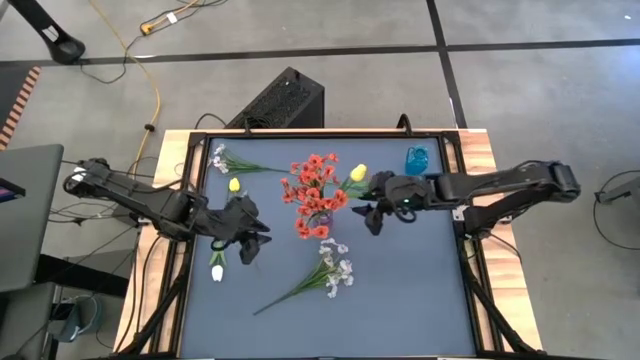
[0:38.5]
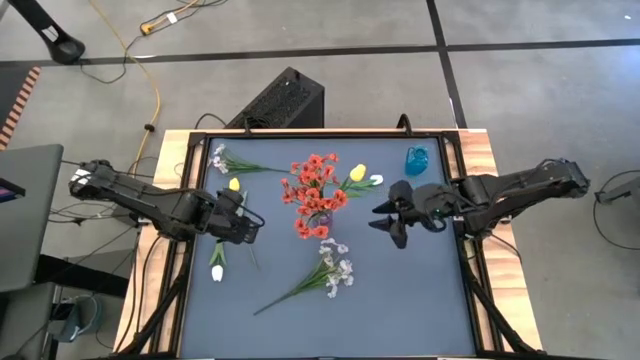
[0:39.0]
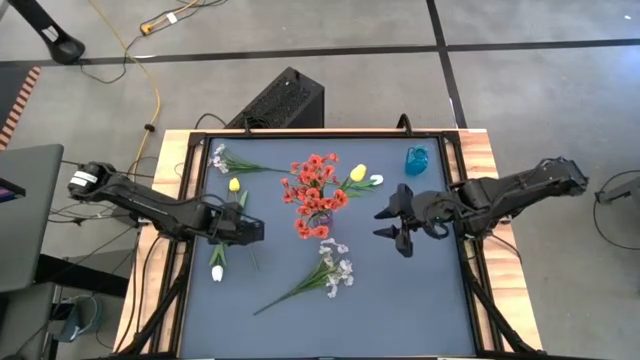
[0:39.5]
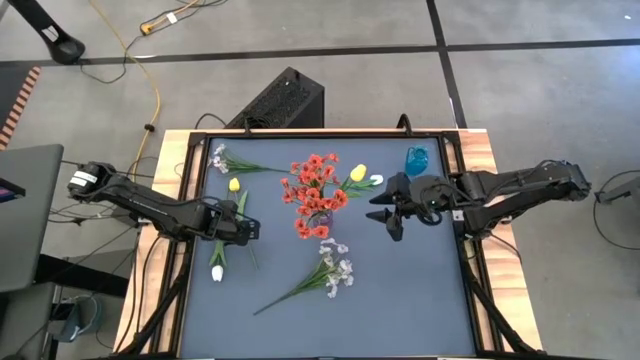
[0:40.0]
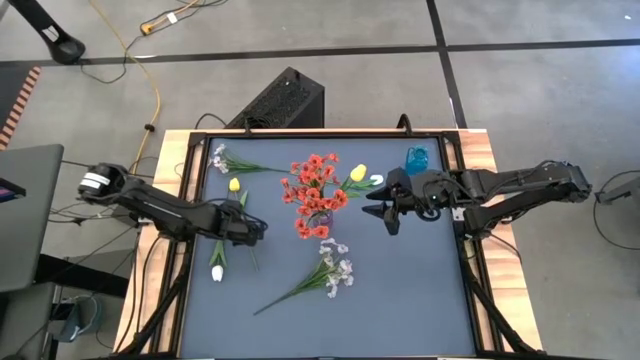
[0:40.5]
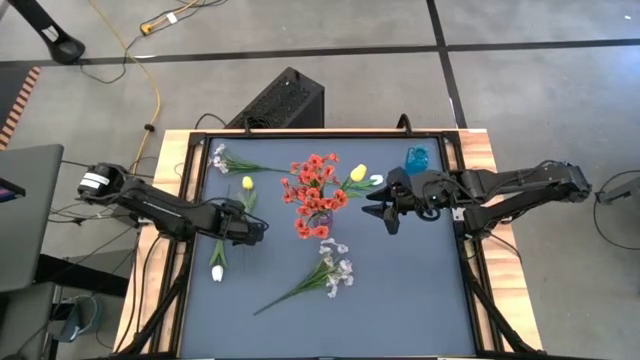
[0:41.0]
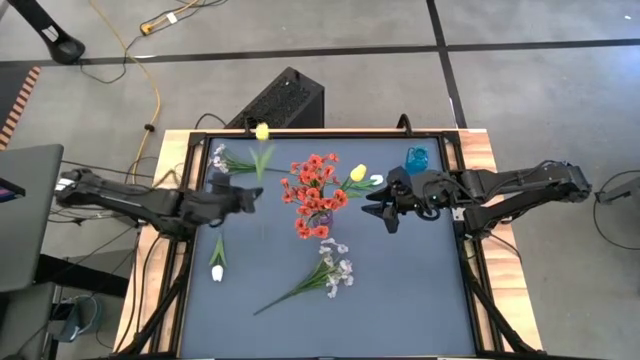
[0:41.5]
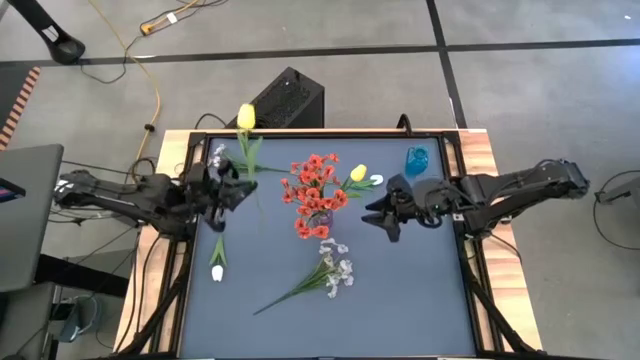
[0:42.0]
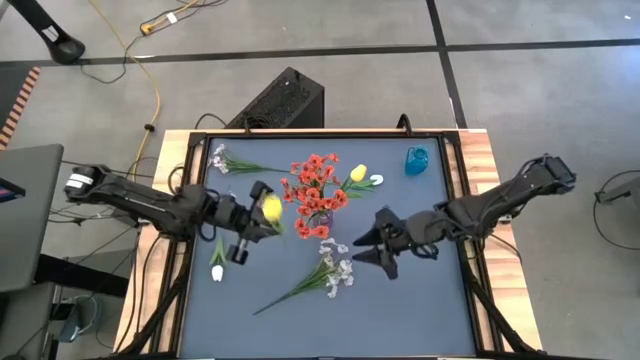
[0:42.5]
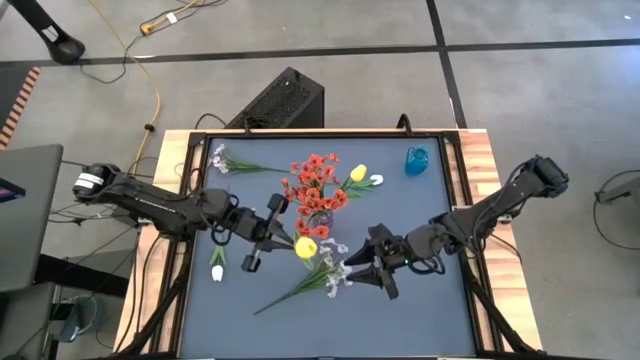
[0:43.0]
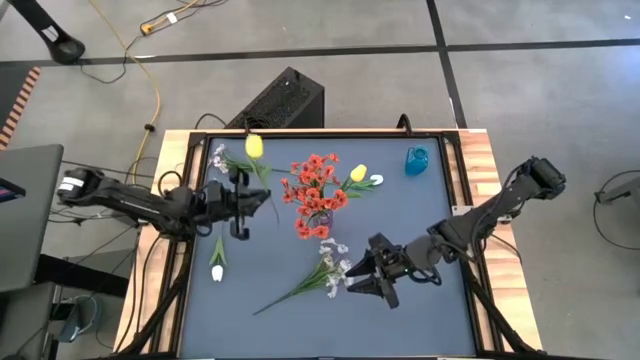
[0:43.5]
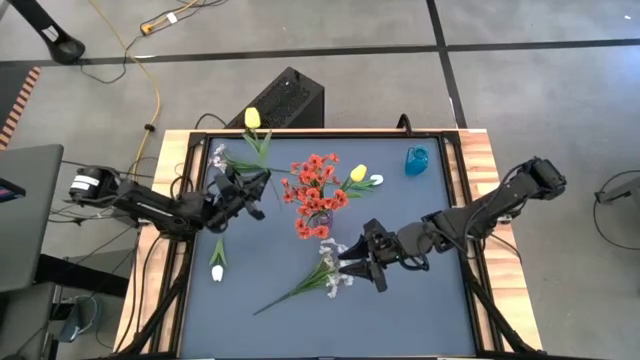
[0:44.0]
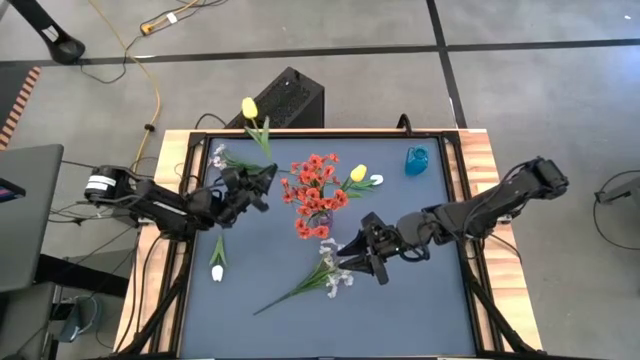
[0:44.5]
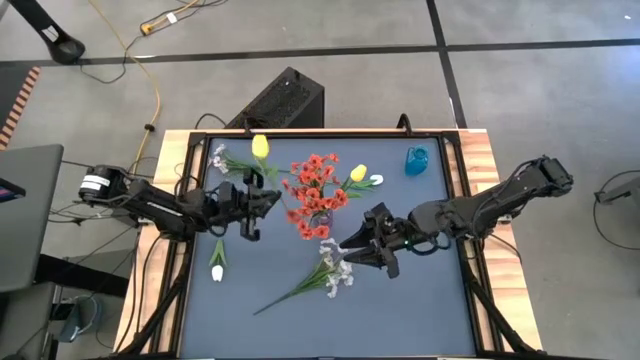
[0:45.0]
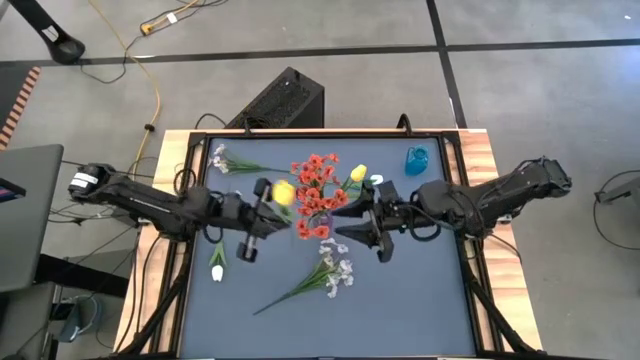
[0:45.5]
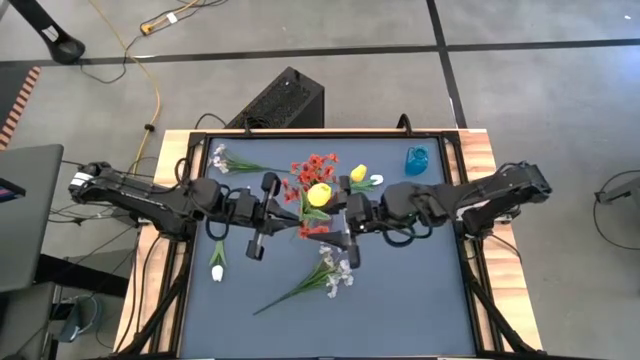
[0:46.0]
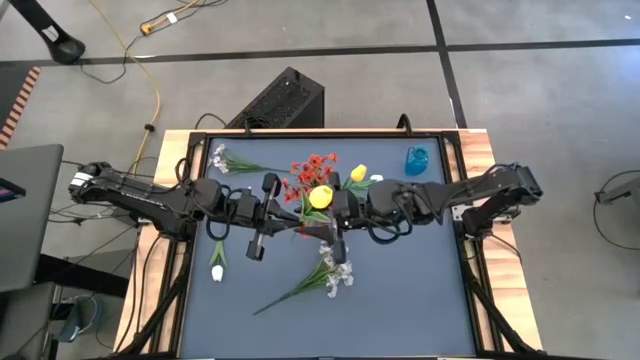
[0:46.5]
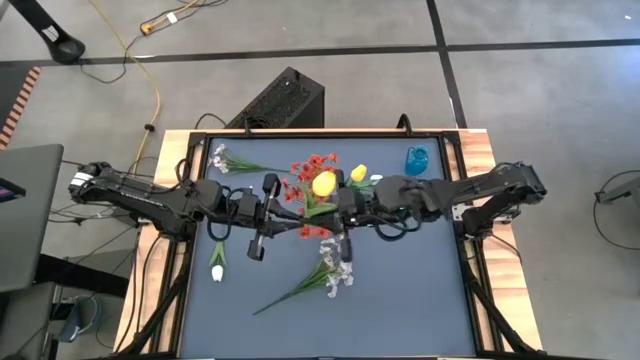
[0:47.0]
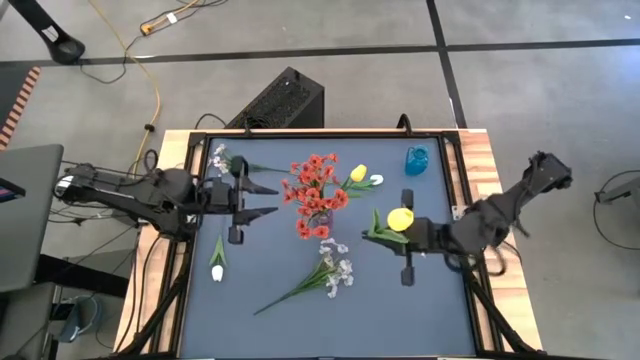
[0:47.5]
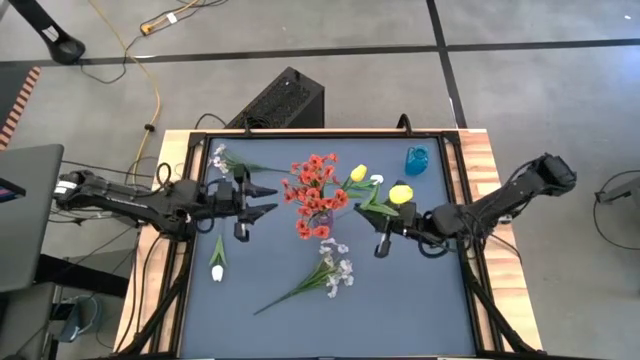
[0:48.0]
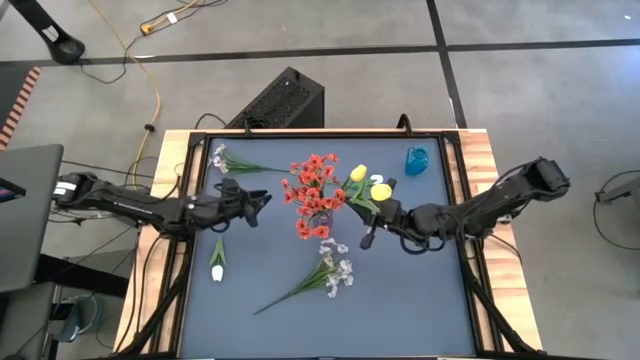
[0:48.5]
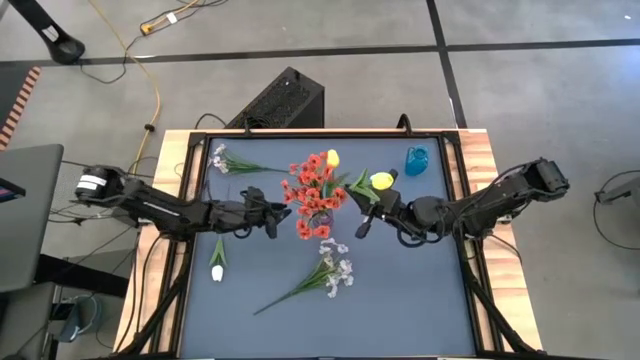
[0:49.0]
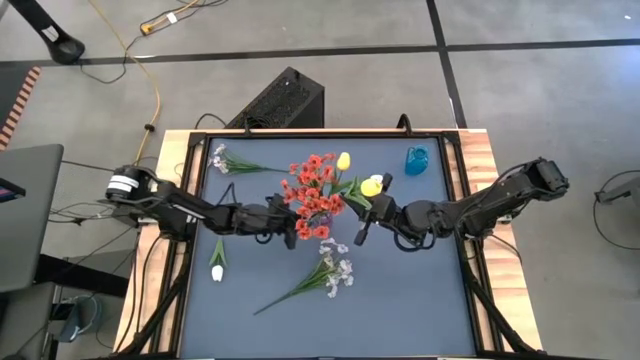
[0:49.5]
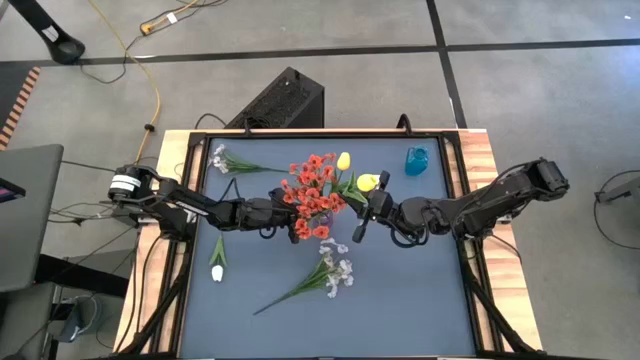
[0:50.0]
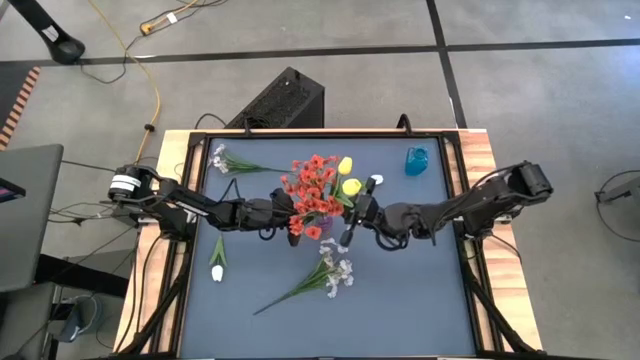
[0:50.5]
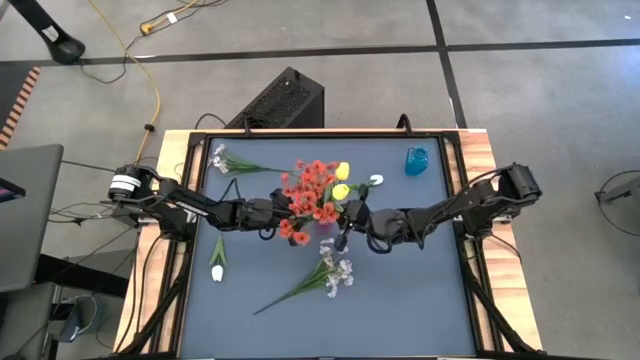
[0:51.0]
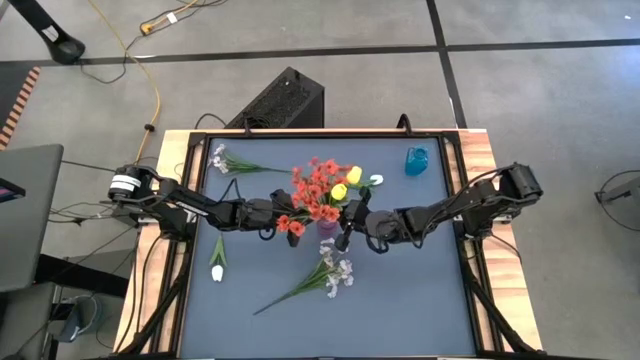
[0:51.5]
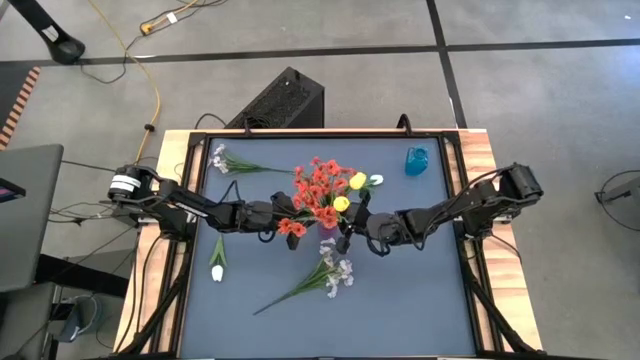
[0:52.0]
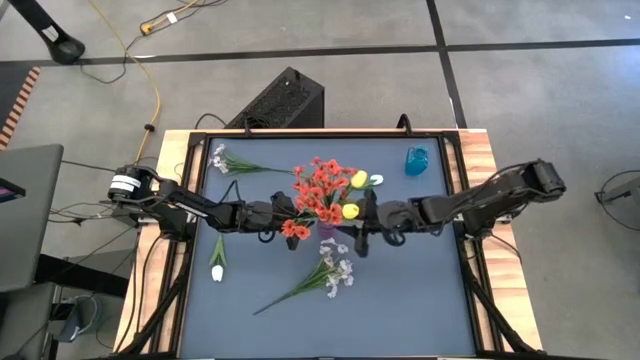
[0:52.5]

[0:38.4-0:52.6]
Task: Sort flowers into vase by color
Put the yellow flower into the pink vase

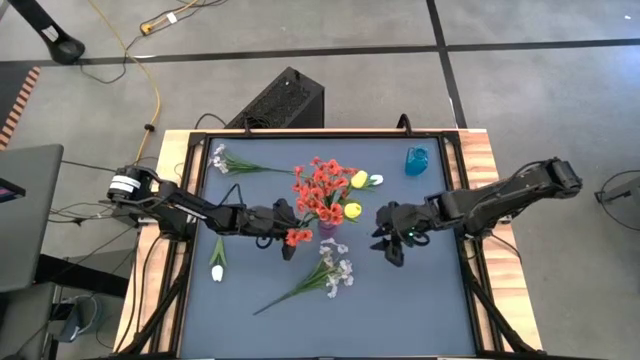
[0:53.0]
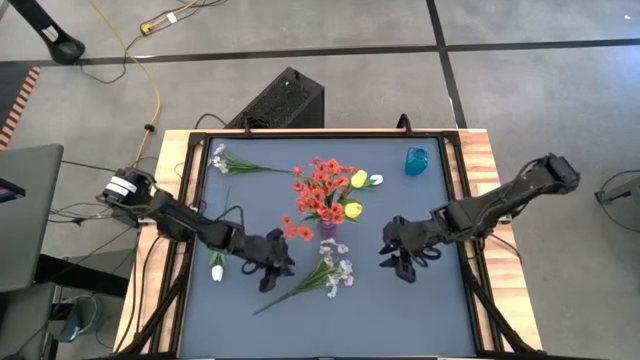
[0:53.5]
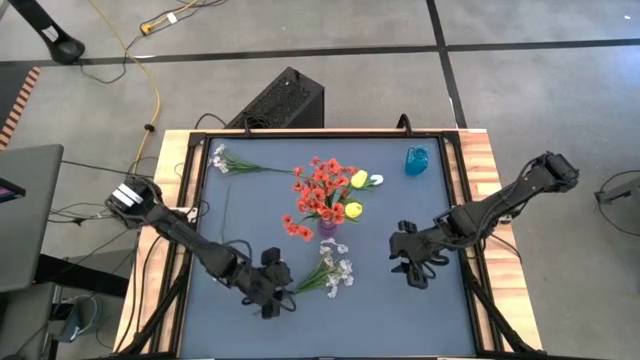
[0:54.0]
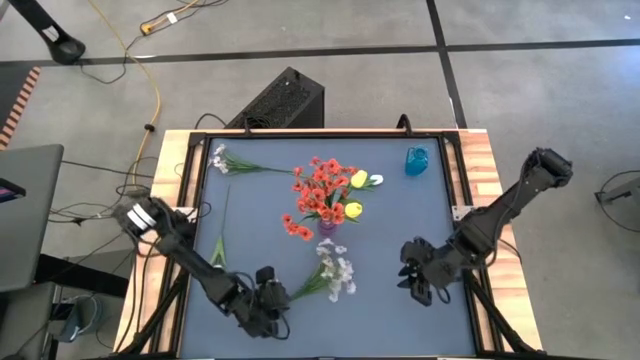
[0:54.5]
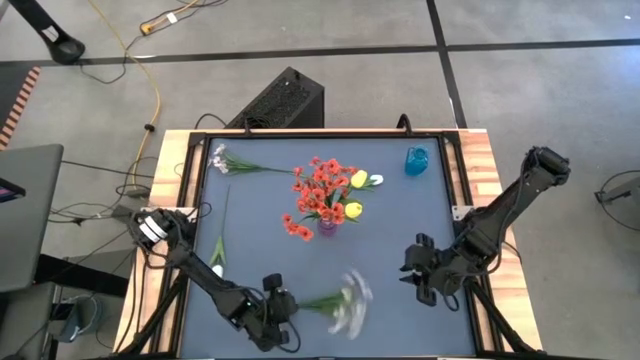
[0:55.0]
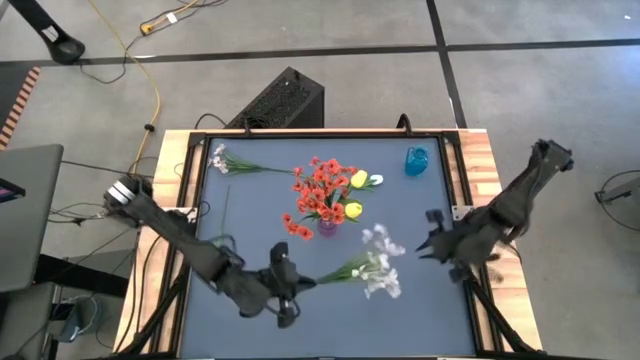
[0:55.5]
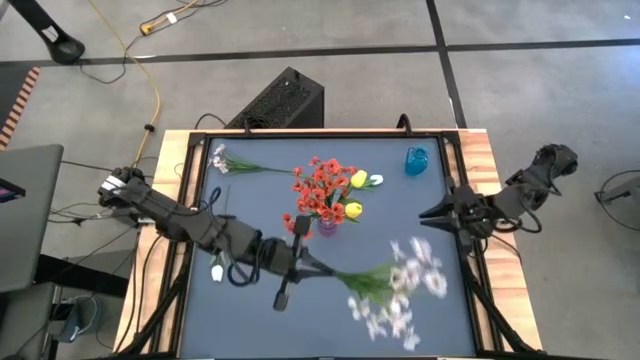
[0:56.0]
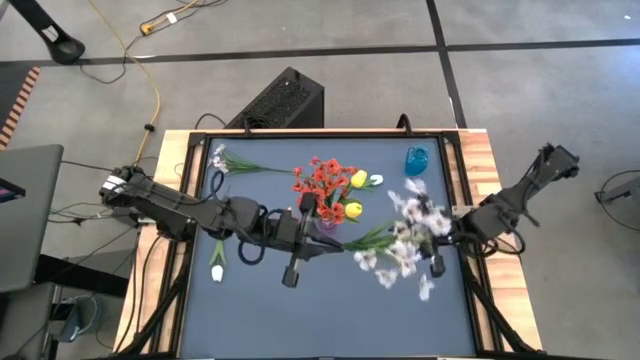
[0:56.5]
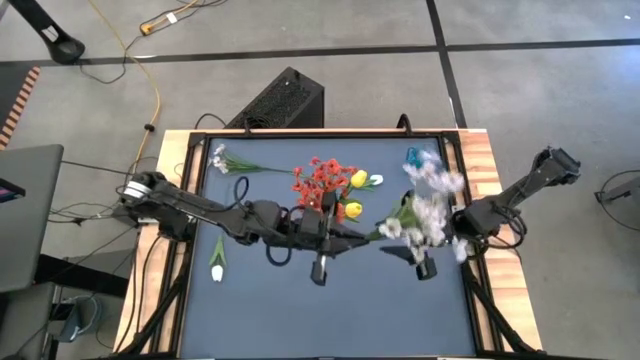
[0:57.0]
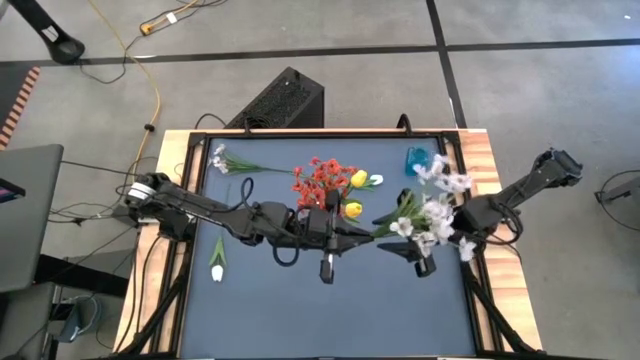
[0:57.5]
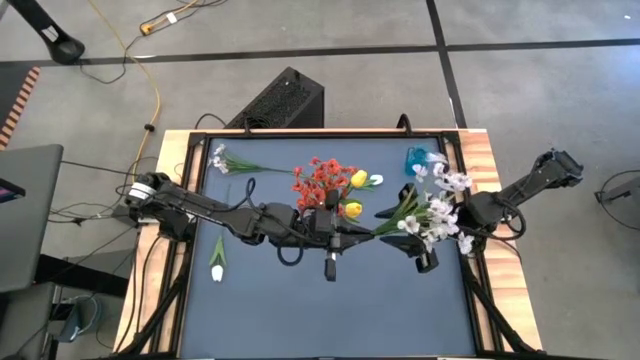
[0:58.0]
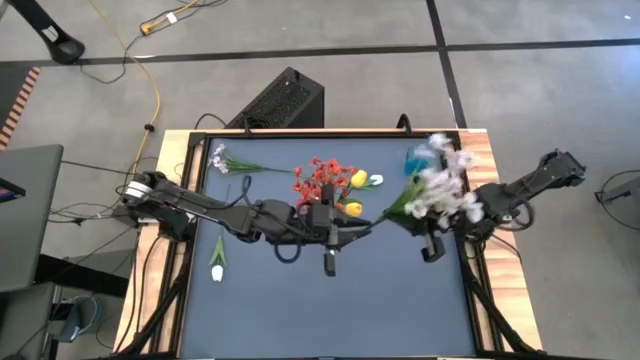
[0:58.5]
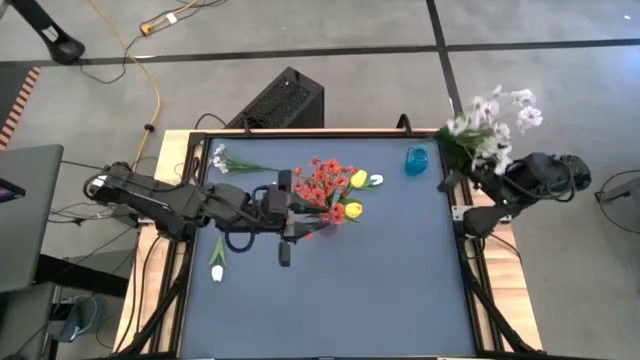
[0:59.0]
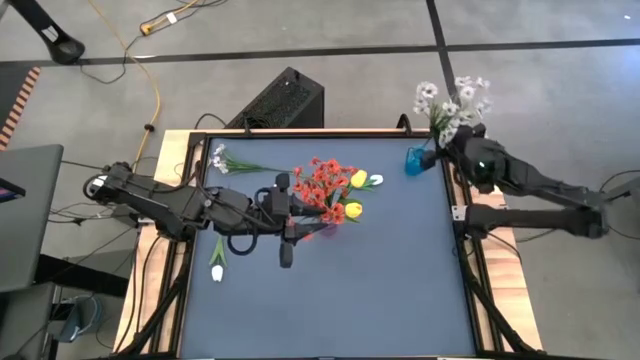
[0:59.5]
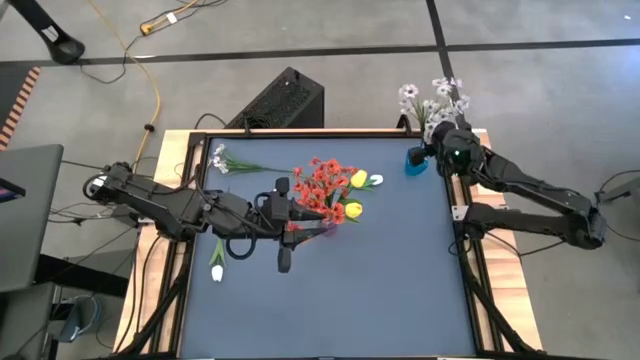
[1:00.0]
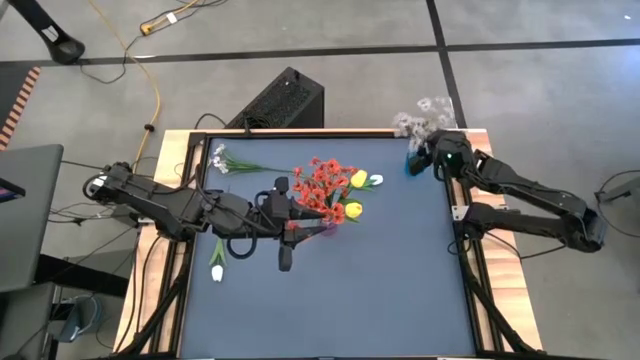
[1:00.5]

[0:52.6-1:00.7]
Put the white flower into the blue vase
